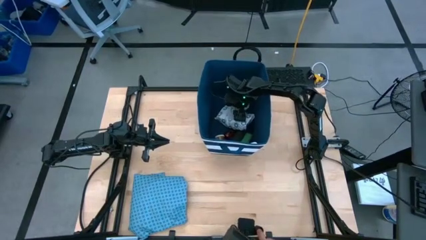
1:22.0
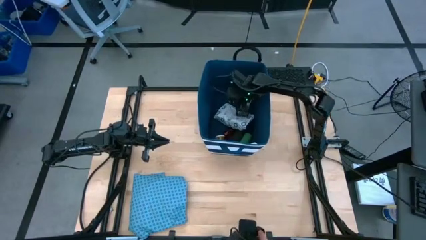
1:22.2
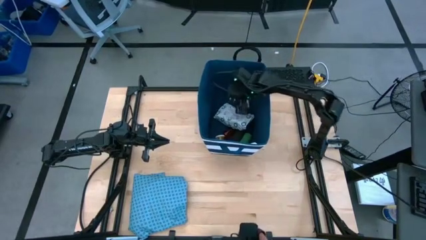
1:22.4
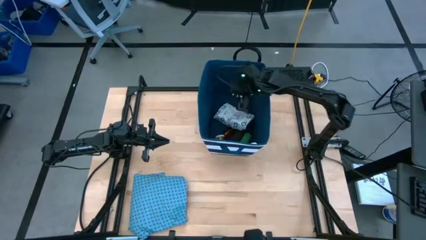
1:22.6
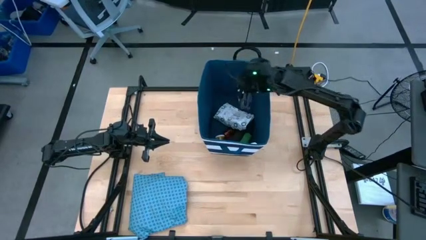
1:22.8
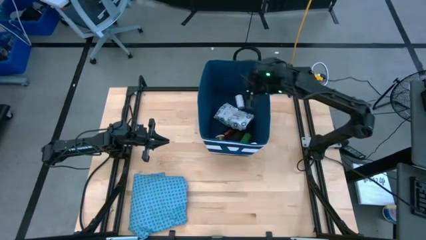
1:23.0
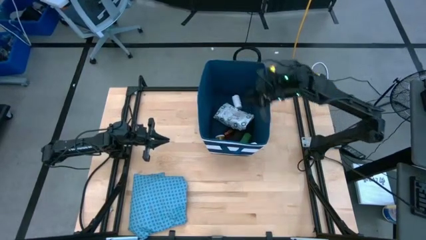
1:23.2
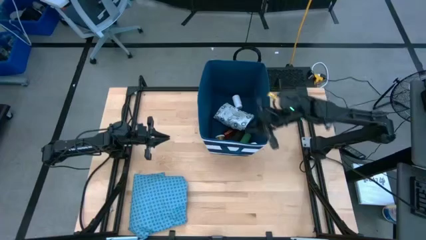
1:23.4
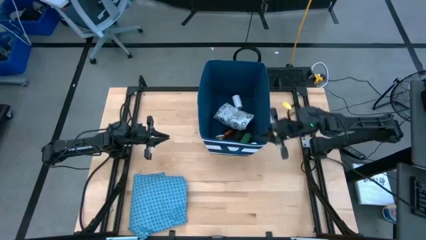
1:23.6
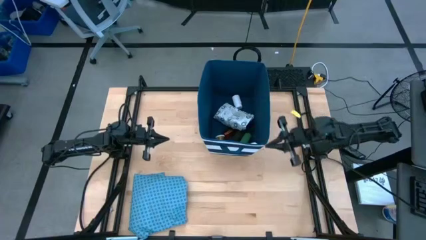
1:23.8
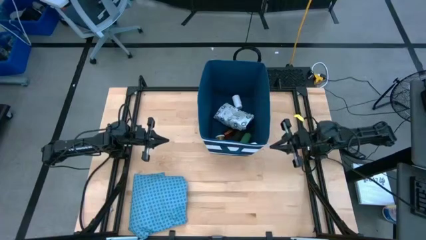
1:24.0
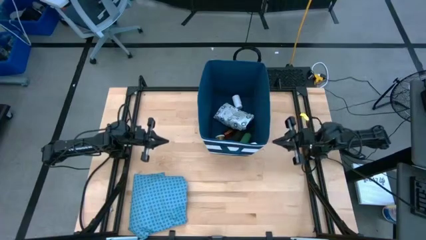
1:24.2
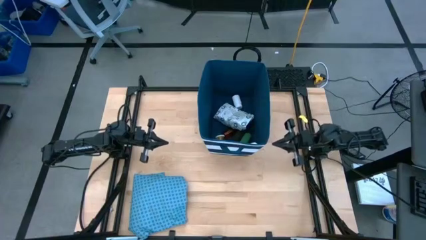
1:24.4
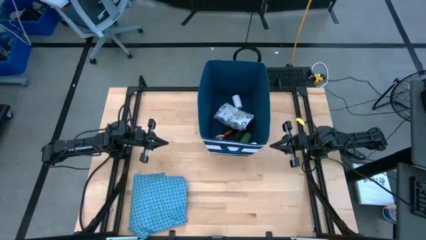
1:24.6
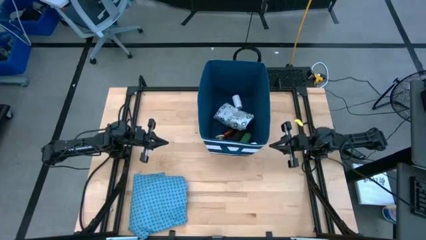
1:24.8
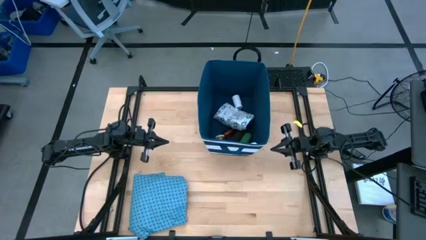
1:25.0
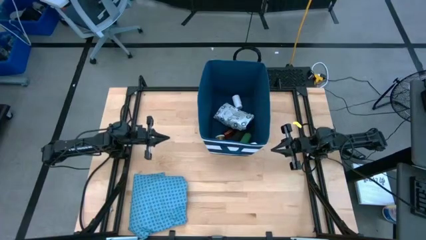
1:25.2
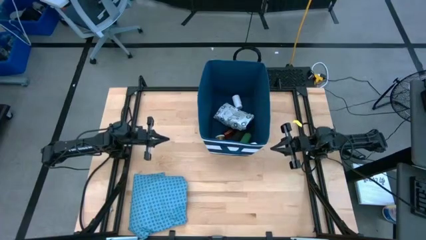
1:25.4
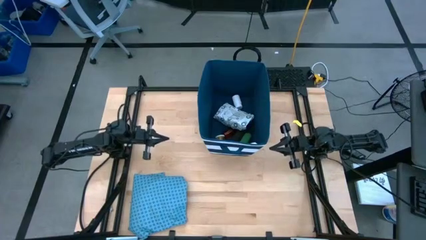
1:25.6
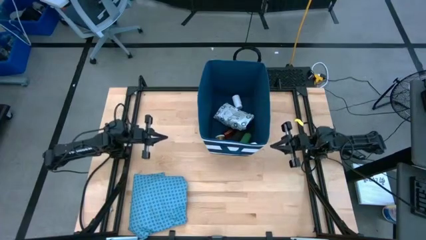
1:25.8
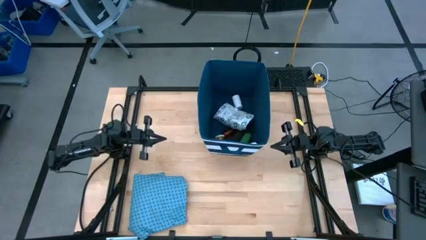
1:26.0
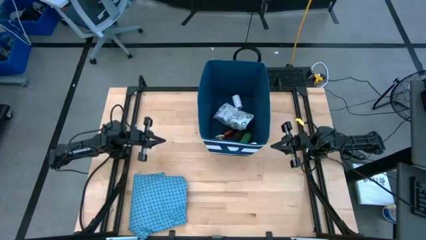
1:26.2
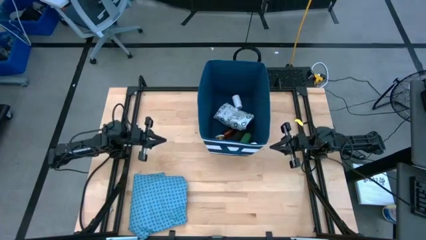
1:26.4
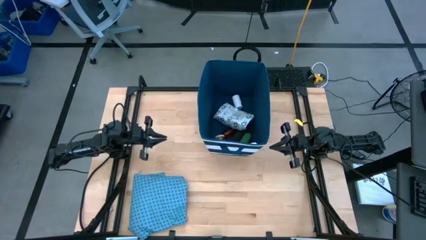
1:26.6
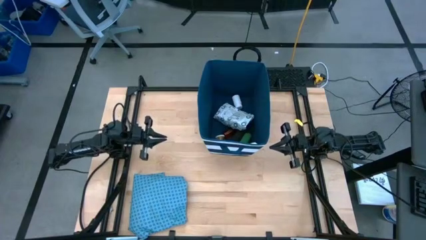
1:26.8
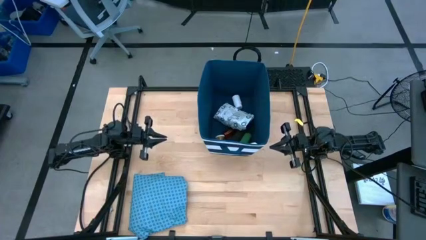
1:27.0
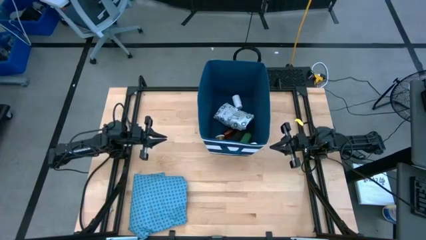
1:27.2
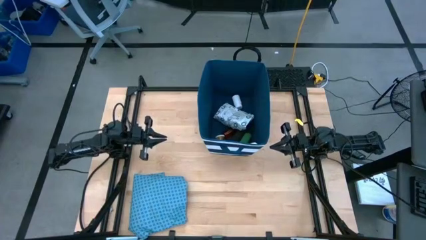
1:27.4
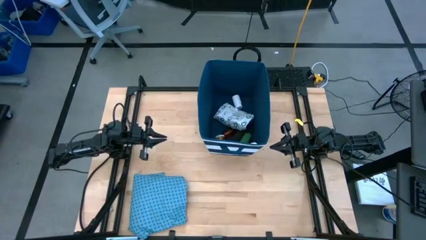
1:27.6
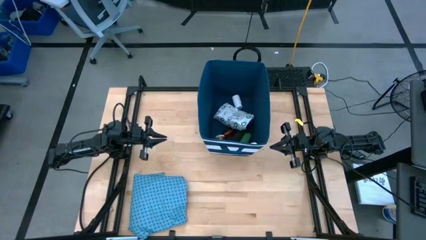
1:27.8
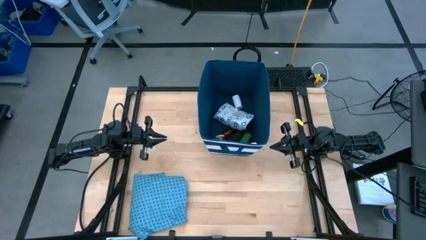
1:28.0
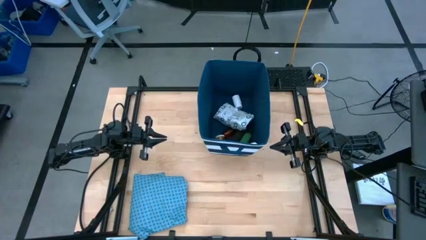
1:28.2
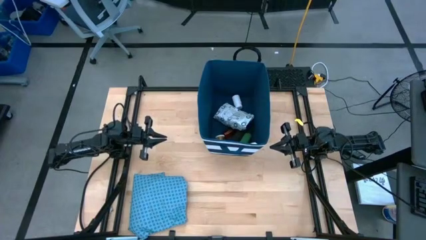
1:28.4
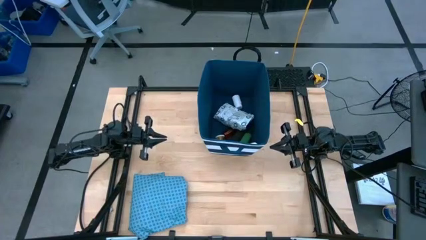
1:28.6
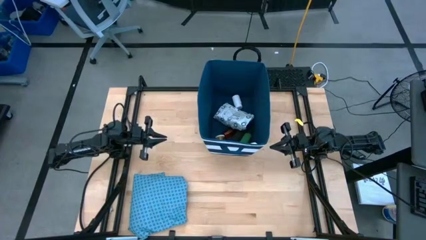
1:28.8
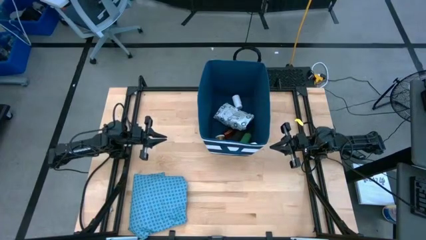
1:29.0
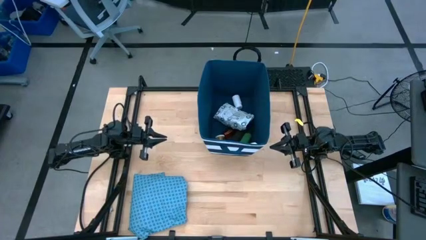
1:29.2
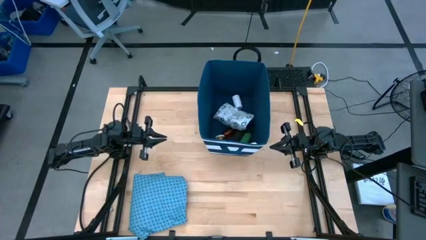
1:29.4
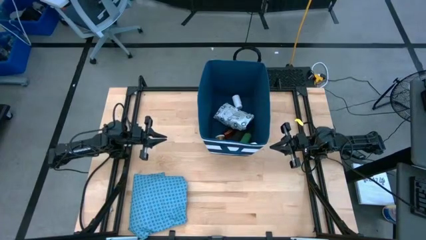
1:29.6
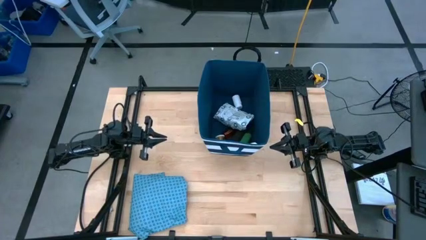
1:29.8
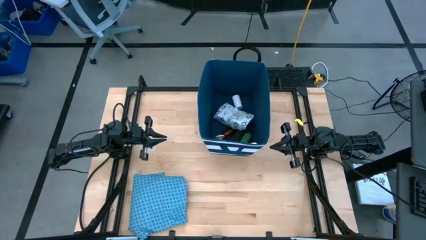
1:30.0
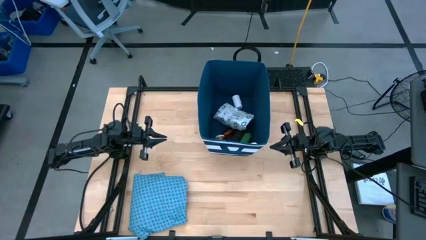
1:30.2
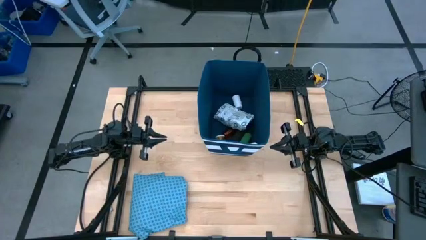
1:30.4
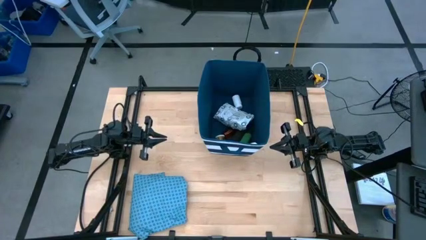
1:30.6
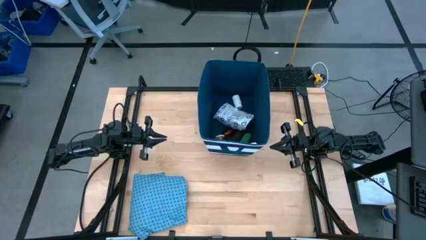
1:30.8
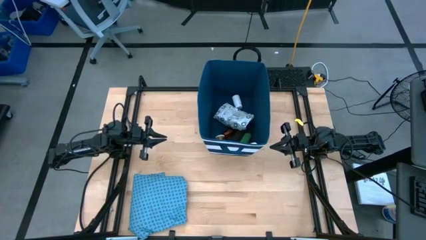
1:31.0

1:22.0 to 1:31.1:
Task: Pick & place medical supplies in basket/bin
Return to home position

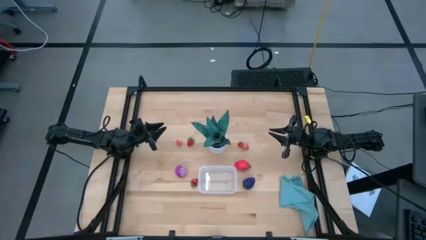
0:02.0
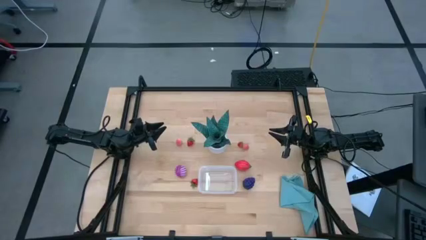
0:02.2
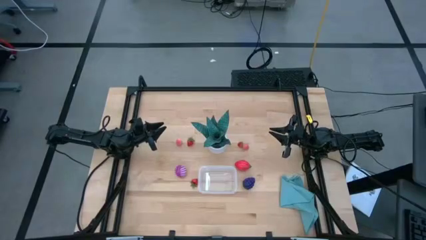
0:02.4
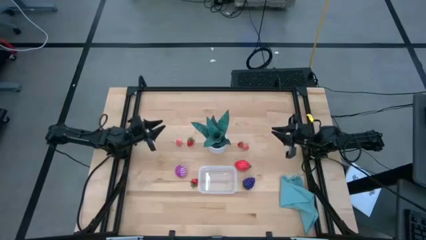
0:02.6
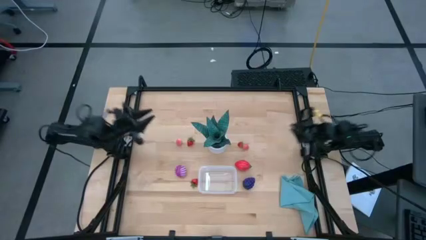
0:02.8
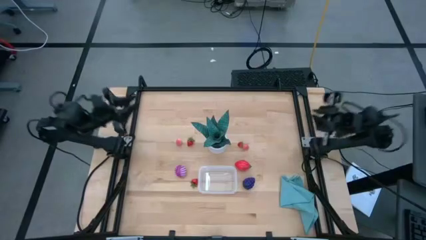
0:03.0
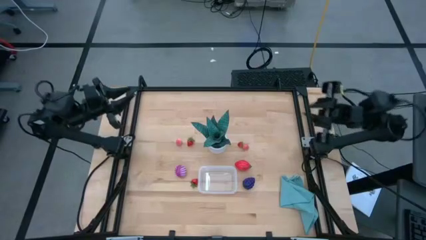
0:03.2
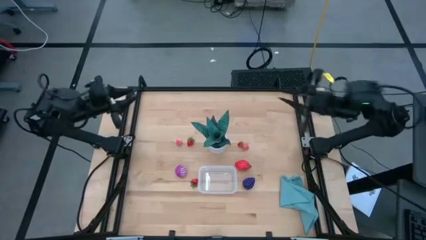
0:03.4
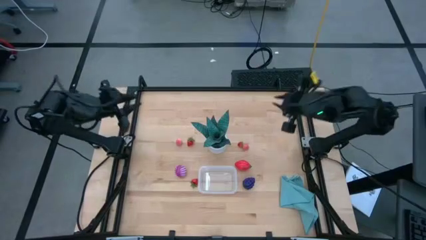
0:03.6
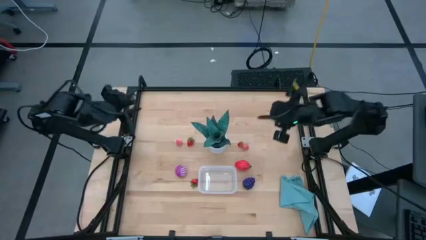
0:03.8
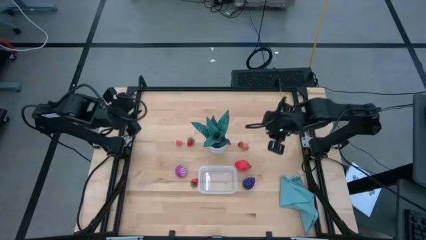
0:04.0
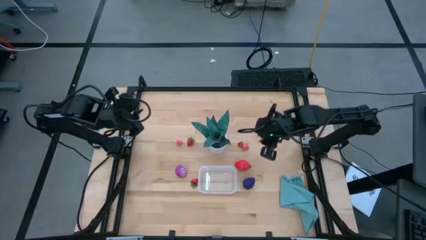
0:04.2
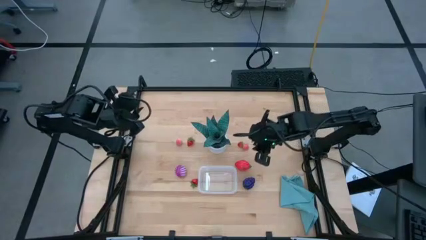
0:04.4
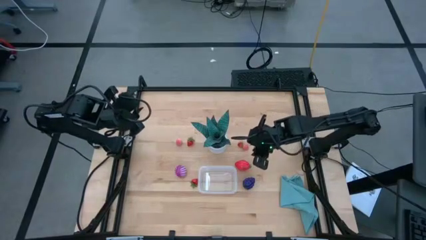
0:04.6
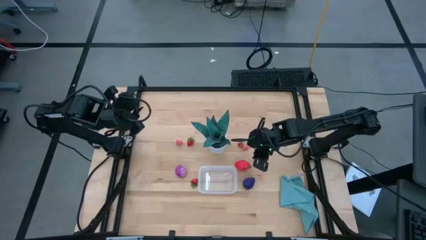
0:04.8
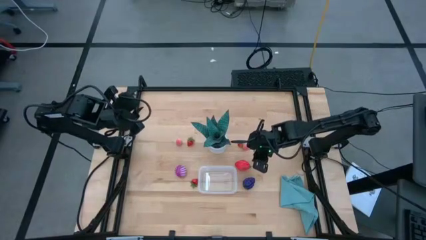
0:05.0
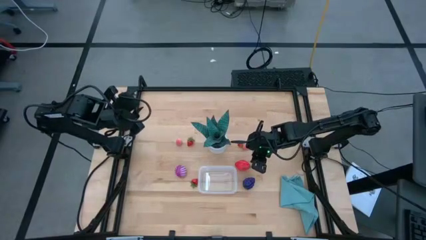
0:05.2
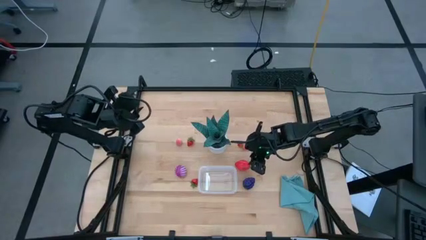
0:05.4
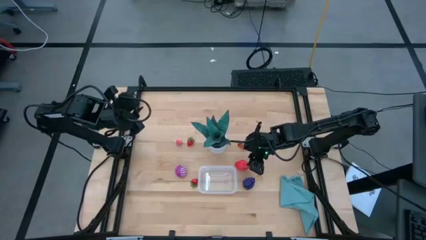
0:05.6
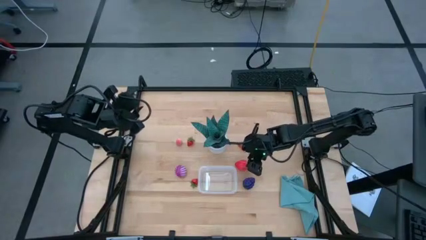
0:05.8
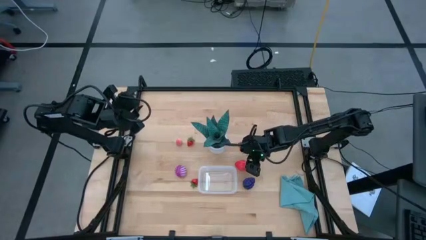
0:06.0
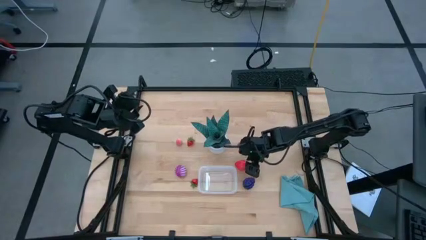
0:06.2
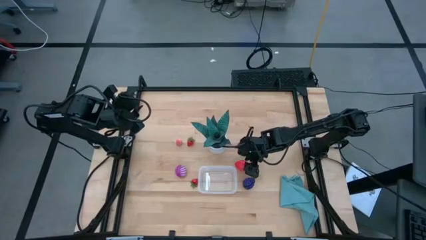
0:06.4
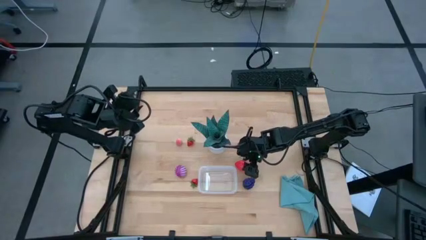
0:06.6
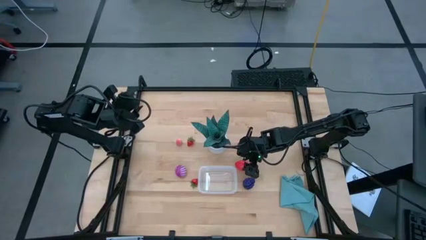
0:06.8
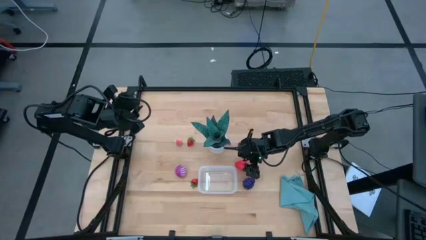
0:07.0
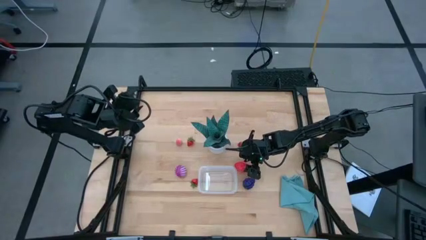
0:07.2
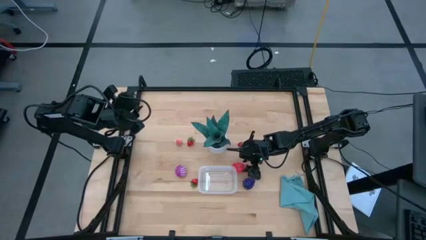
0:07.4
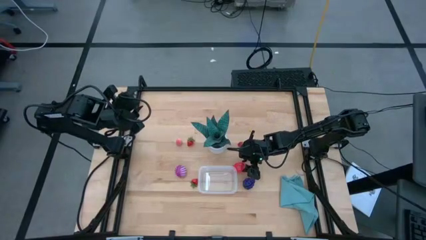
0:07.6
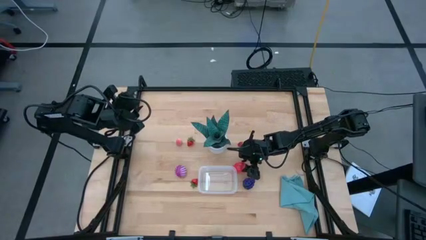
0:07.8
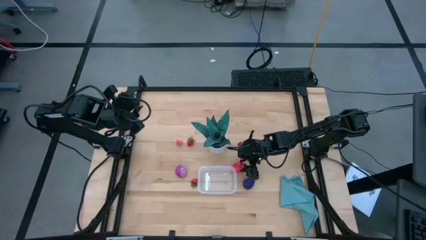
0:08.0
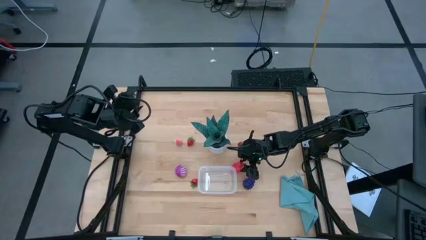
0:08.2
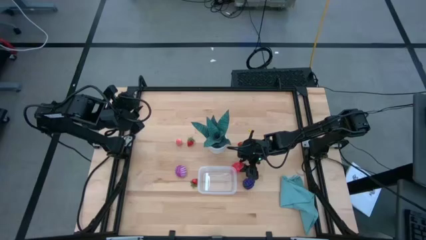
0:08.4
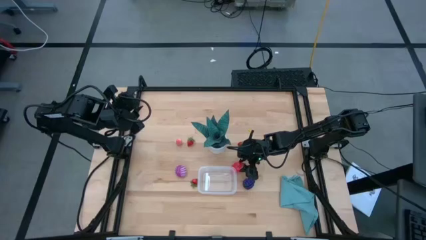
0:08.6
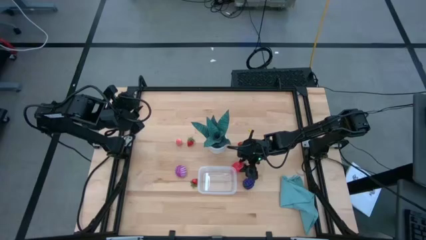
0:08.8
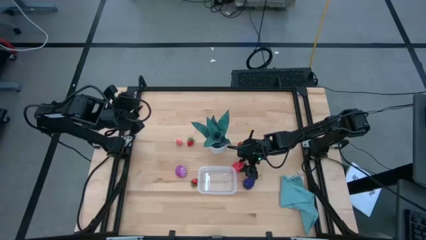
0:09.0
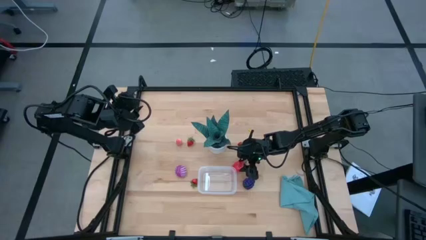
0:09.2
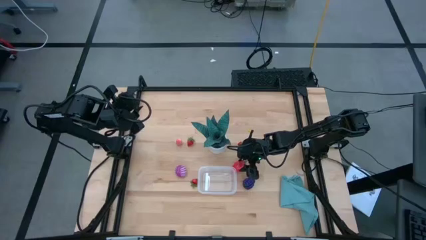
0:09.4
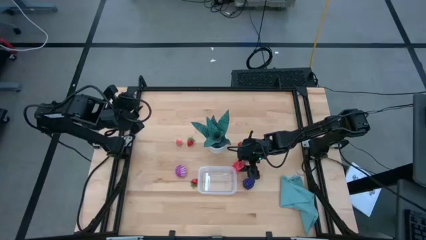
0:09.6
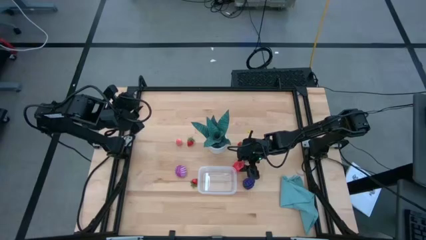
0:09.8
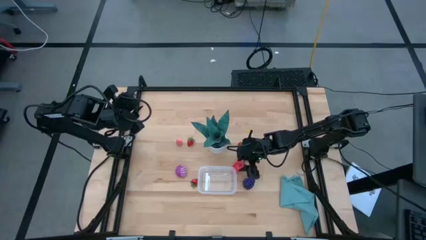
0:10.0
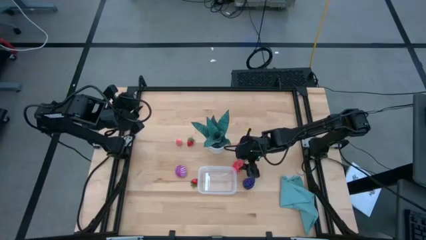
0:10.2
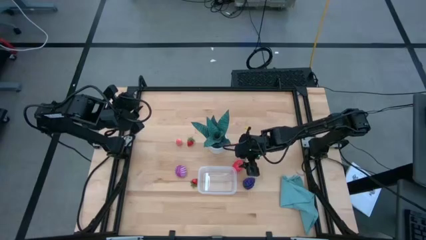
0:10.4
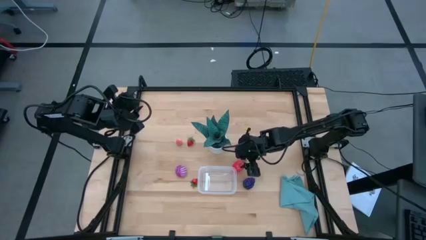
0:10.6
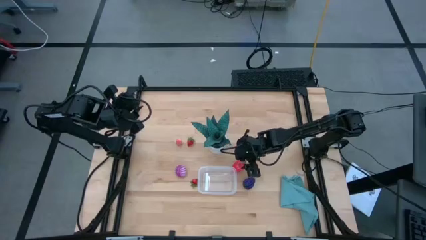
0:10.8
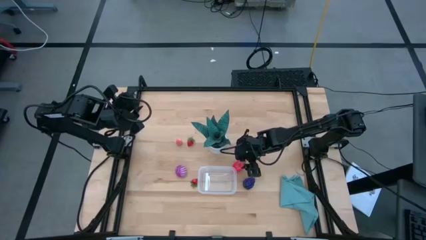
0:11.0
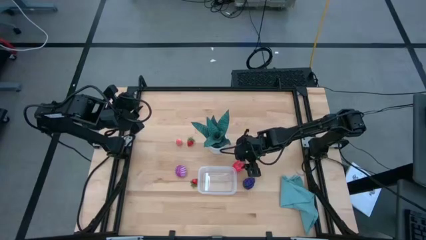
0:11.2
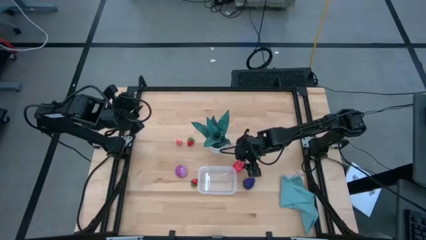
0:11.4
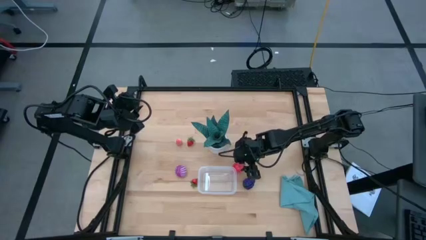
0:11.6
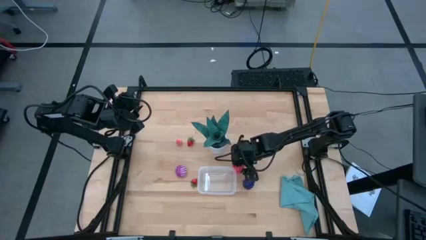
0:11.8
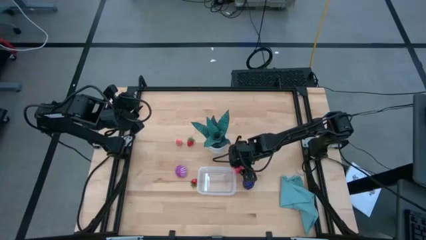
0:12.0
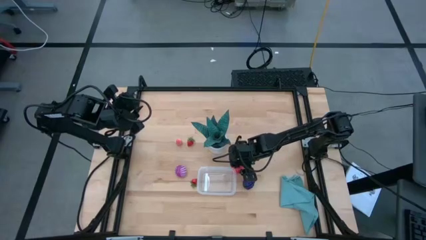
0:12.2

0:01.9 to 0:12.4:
Task: Pick and placing Produce into tupperware
Put the red dragon fruit into the transparent bin
